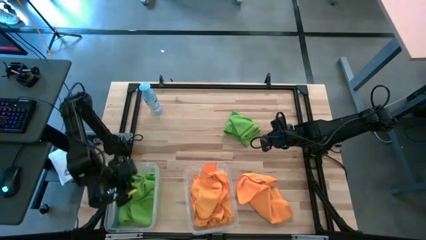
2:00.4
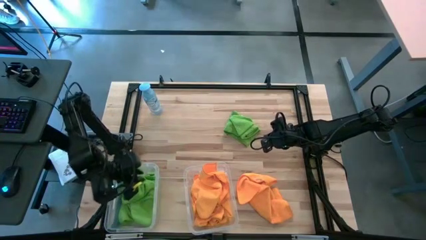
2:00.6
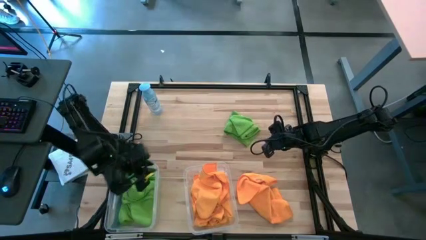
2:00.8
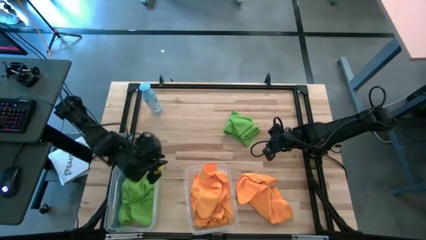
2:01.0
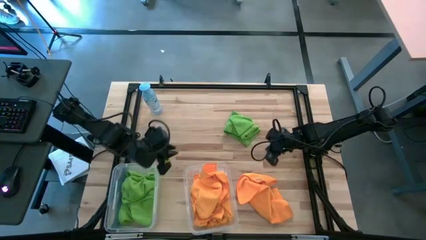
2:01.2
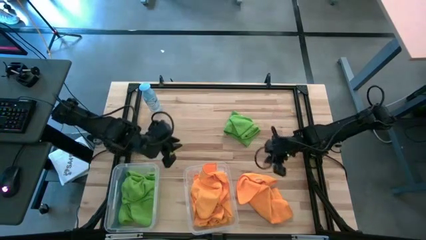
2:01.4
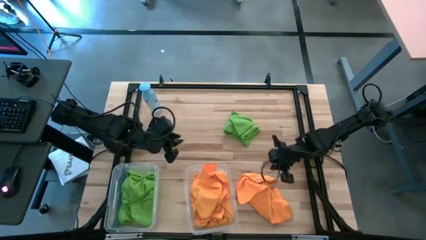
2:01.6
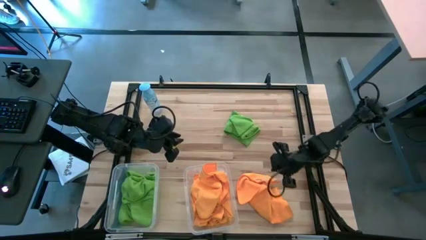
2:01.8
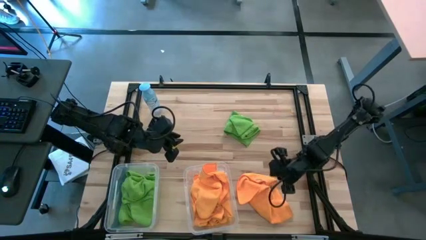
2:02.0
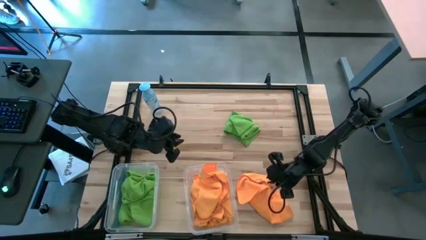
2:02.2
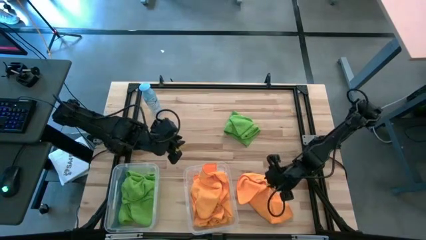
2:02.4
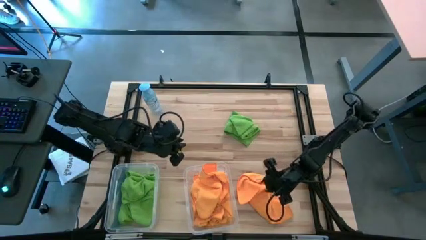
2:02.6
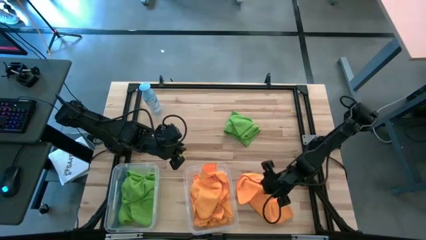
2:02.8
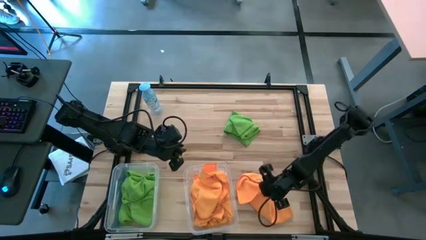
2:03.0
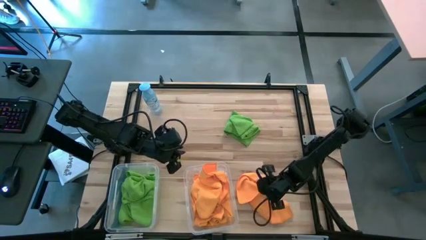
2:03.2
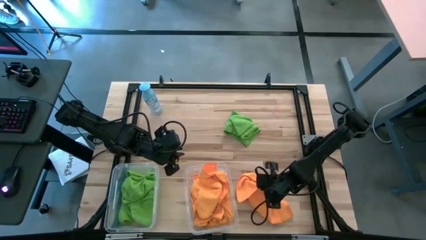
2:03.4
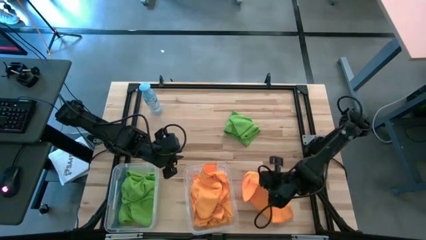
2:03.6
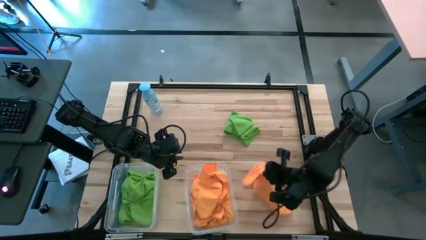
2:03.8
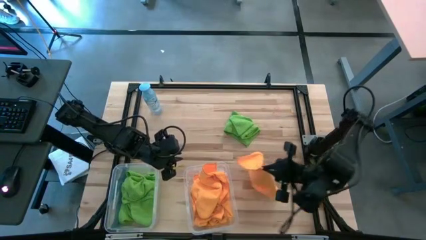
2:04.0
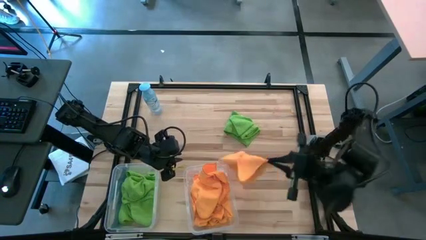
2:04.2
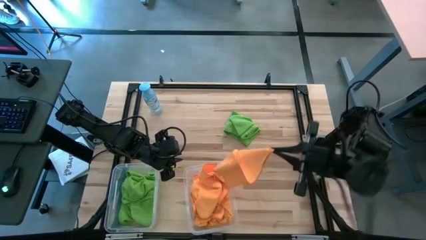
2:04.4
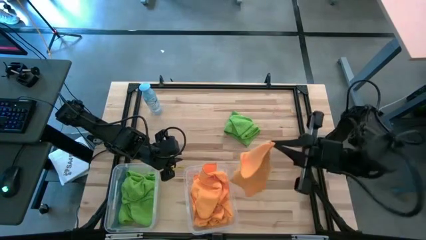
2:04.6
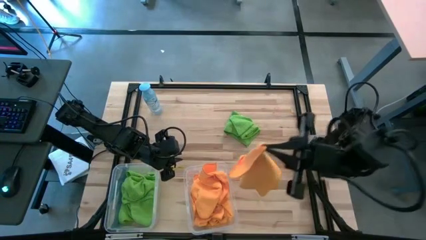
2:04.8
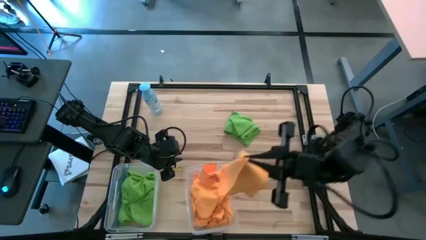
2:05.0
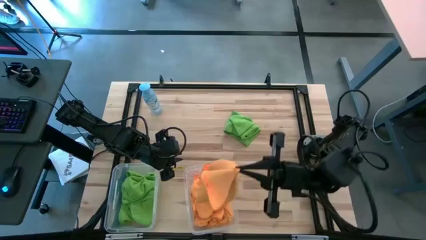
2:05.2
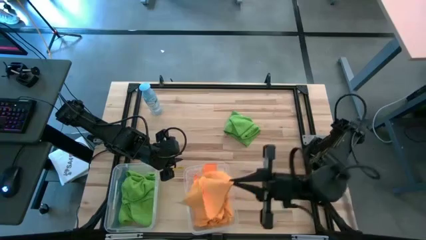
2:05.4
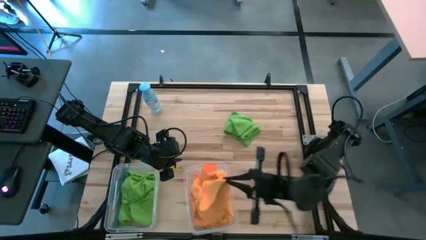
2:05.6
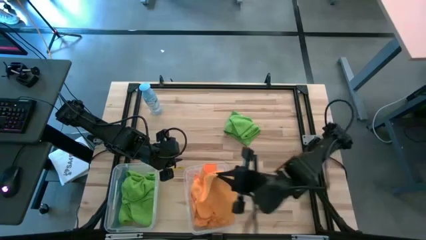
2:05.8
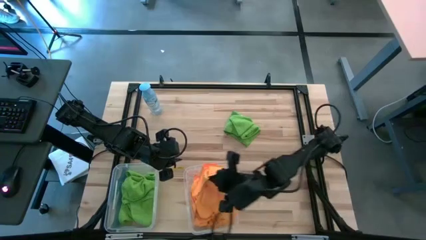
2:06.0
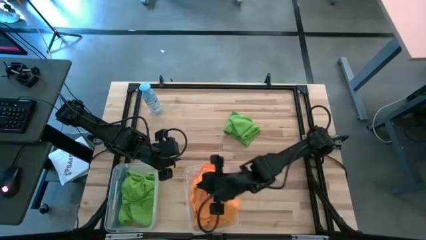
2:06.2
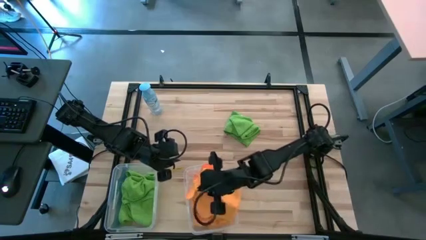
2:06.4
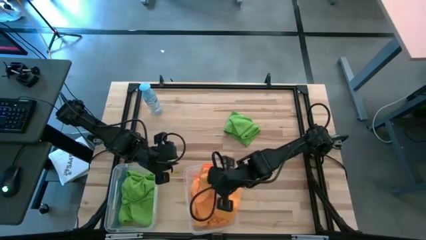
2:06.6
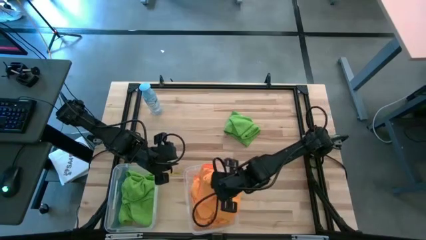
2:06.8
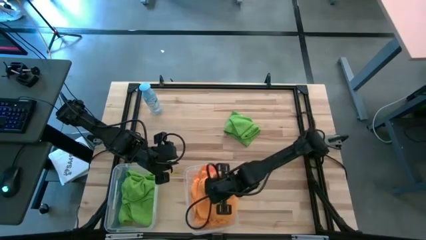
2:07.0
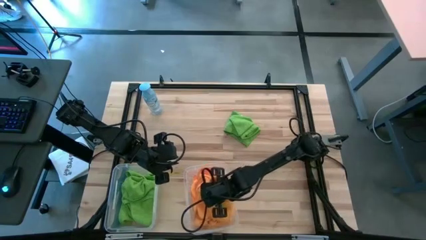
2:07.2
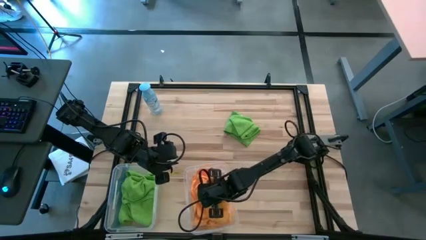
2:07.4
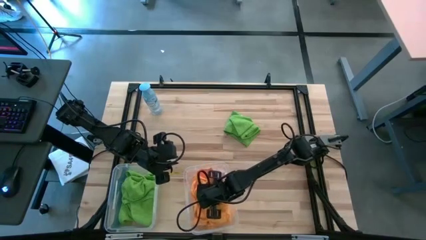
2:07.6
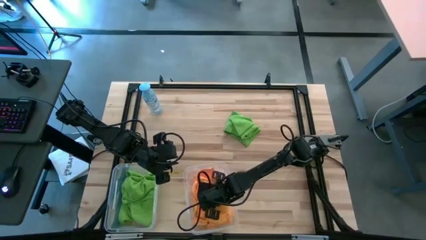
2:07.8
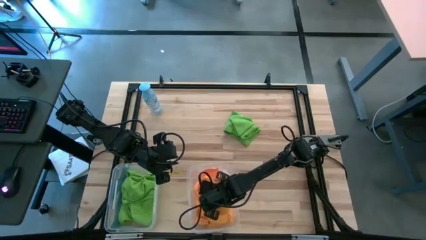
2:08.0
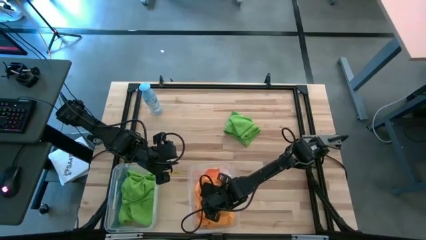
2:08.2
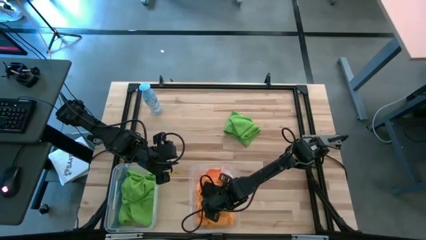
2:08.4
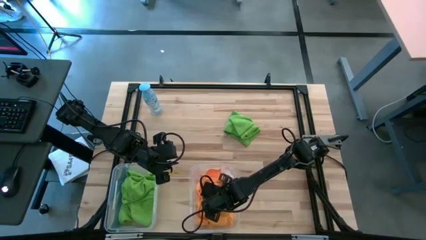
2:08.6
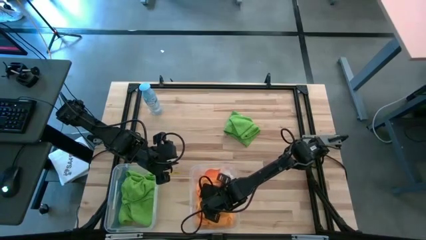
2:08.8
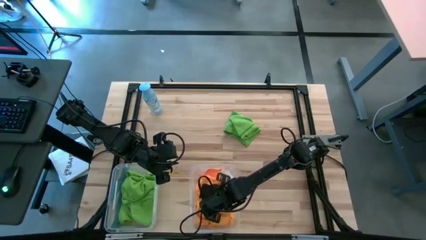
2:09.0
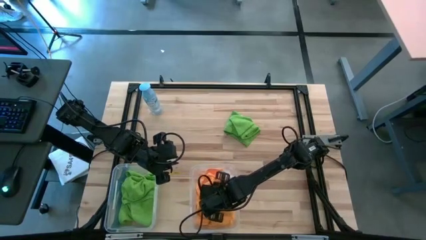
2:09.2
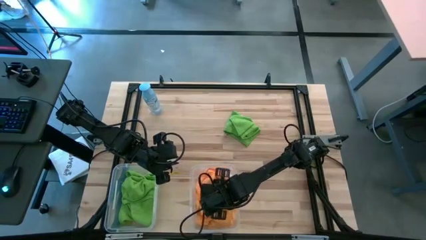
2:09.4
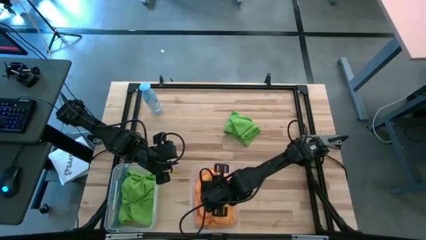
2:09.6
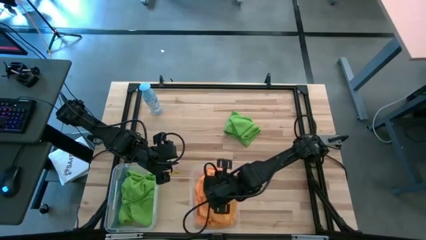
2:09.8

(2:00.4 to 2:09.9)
Task: Sort microfiber towel by color & place in baskets
Put the orange towel into the right transparent bin

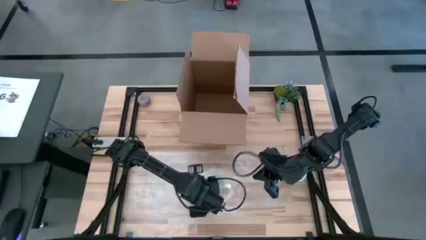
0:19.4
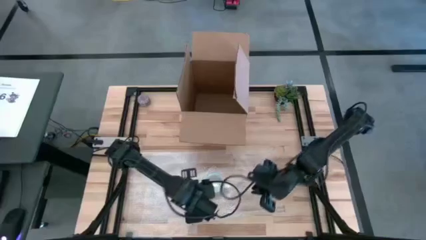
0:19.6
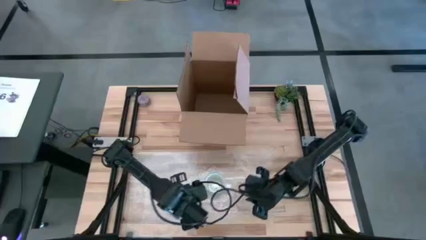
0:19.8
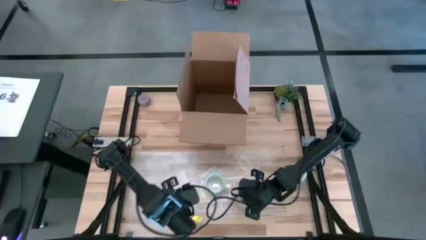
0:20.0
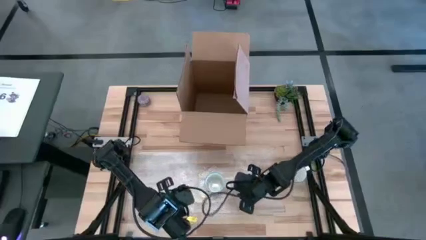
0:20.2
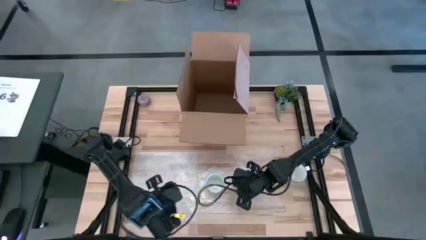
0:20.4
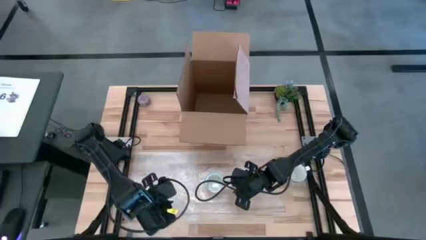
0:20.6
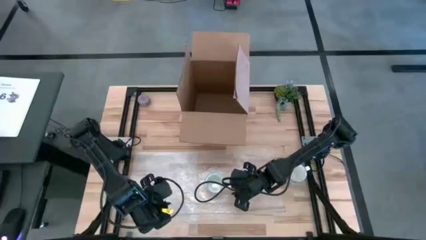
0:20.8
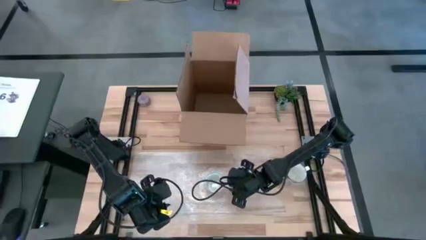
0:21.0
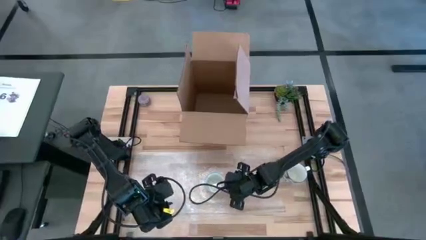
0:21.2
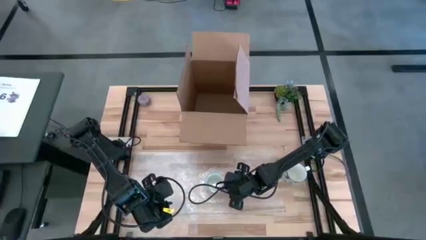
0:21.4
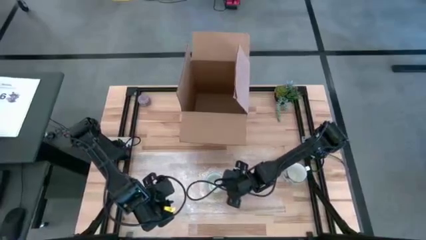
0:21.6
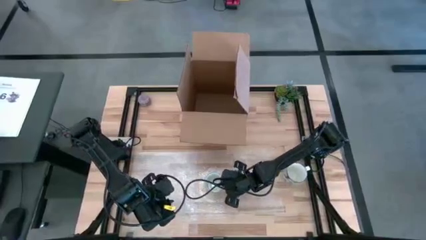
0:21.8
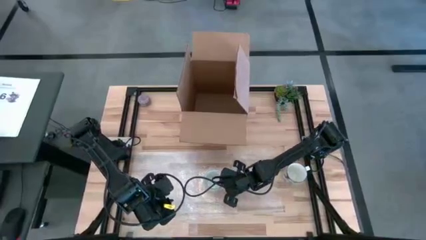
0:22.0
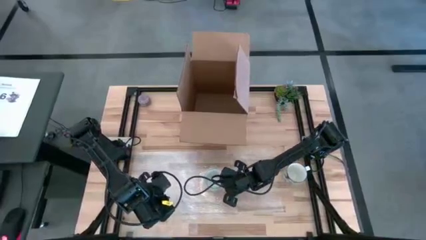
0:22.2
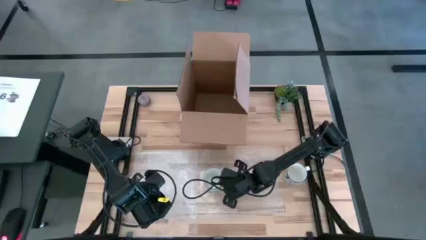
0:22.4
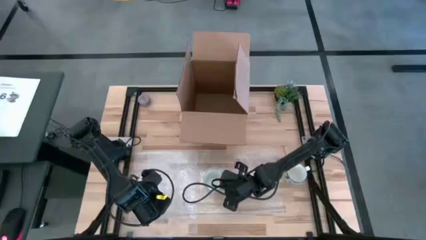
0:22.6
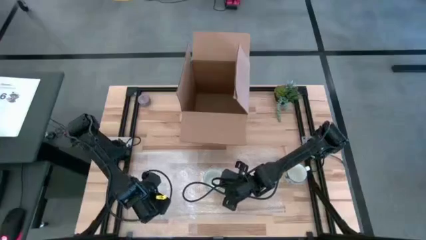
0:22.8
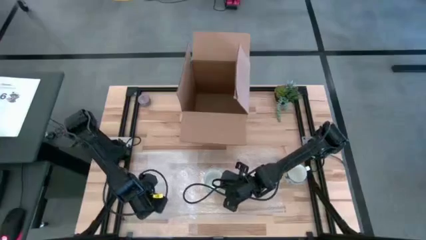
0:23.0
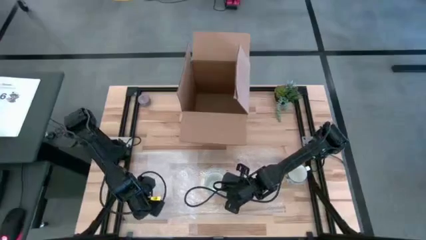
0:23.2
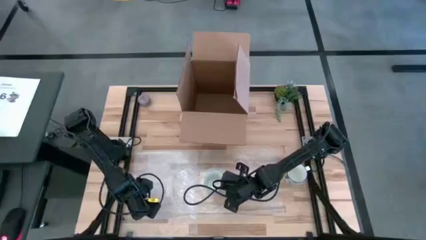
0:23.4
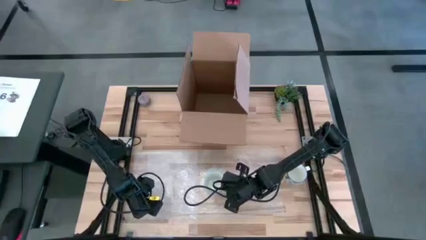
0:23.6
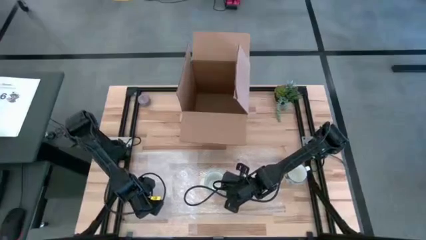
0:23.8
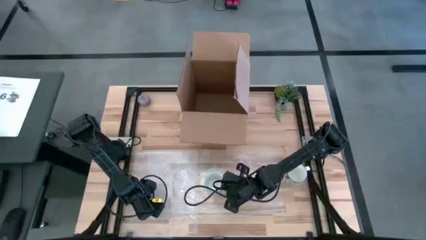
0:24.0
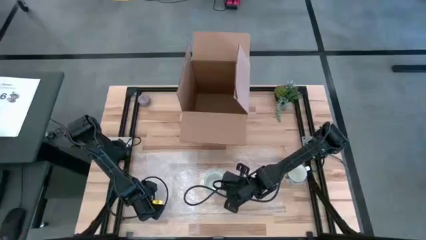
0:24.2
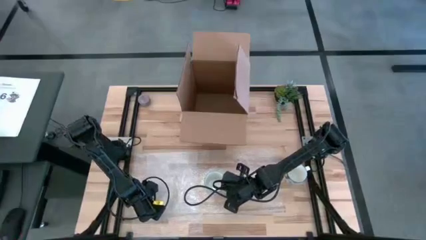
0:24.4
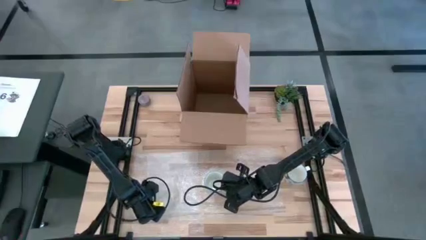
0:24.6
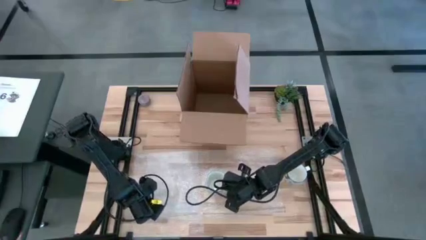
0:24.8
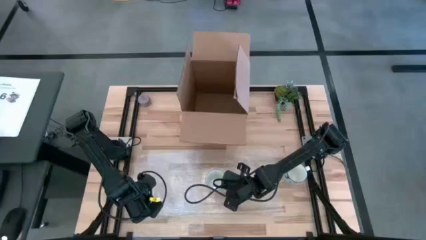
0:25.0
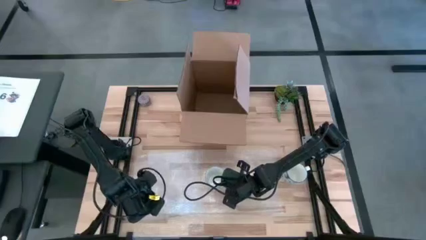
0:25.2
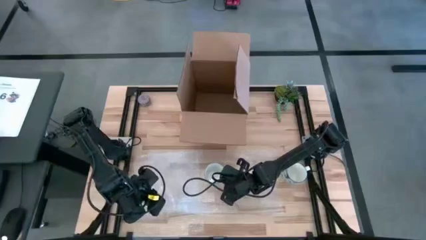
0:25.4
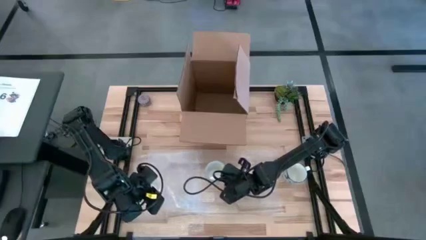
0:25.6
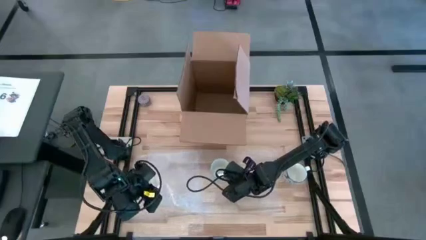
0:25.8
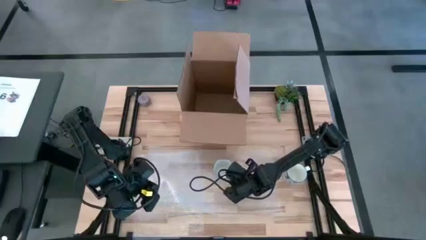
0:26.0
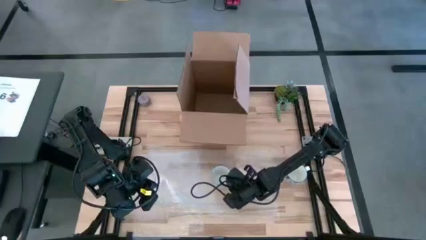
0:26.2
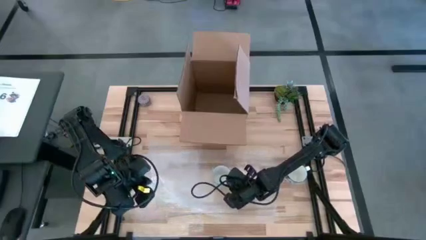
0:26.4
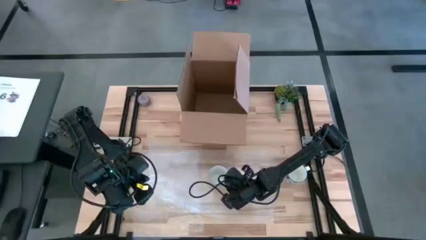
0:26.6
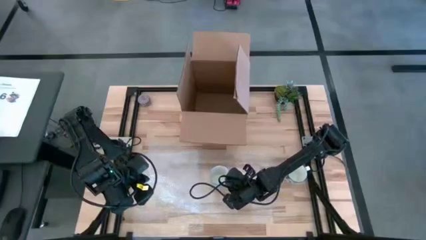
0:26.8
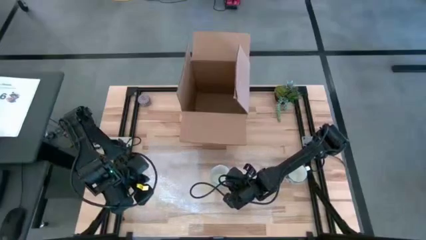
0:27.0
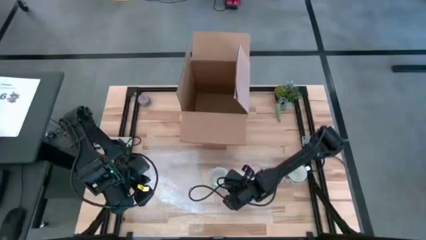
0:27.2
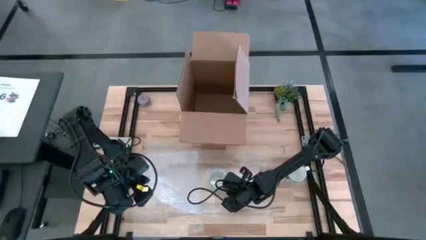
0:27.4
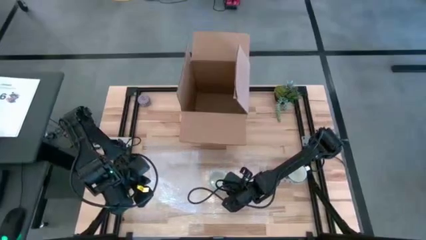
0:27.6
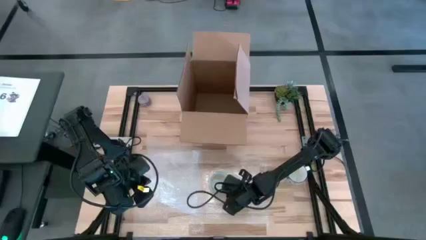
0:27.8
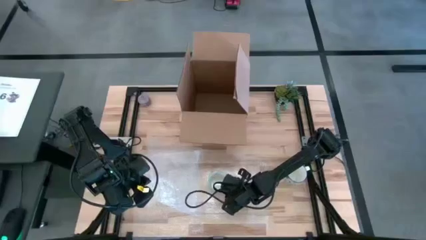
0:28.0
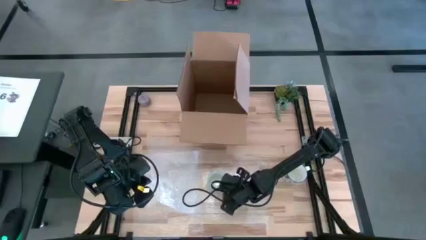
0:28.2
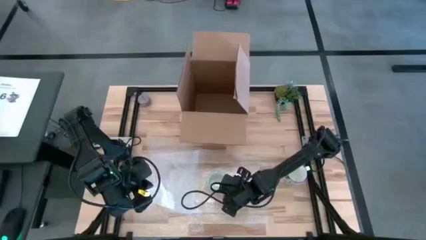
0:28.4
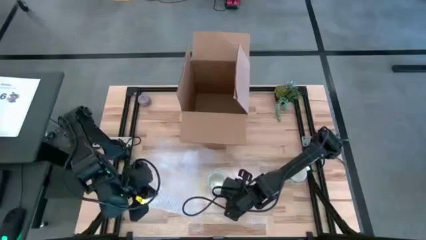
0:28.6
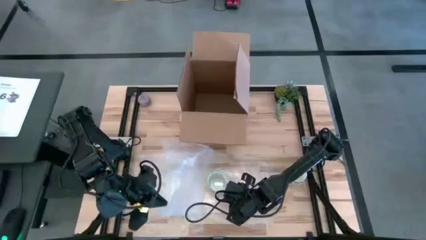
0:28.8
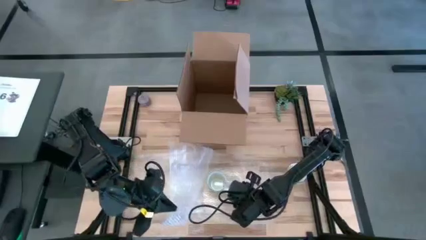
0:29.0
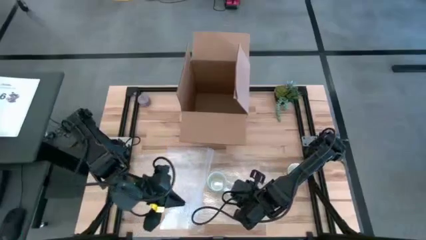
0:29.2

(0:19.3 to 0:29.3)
Task: wrap mug
Wrap the blue patterned mug with the right transparent bubble wrap
